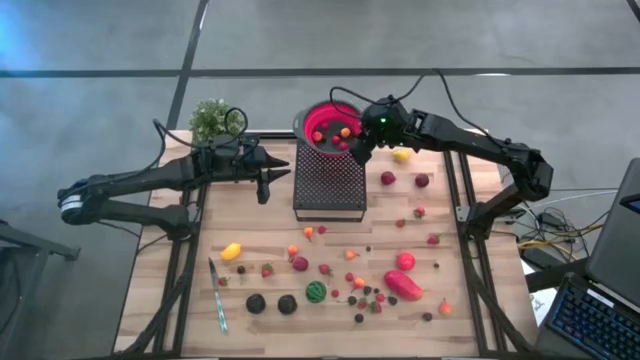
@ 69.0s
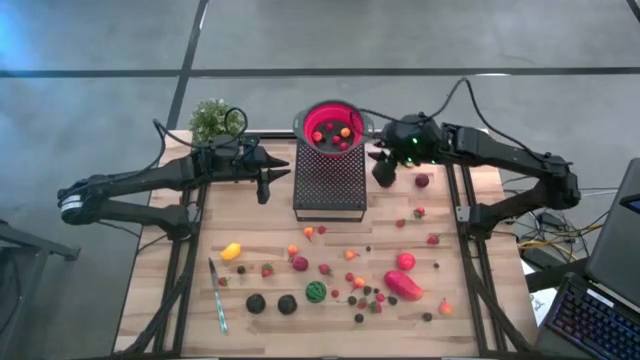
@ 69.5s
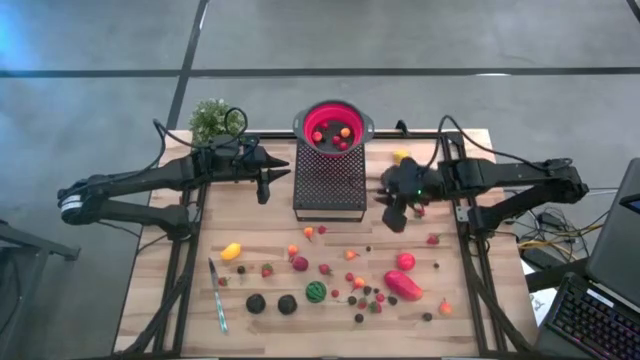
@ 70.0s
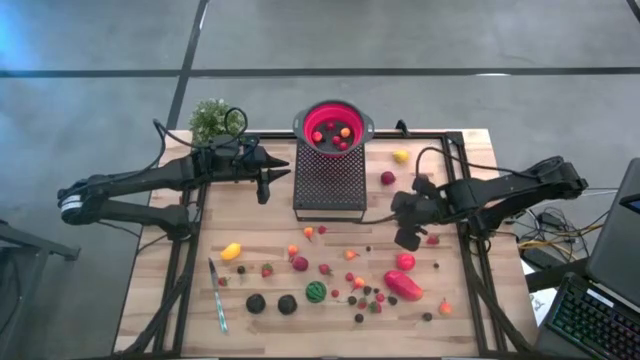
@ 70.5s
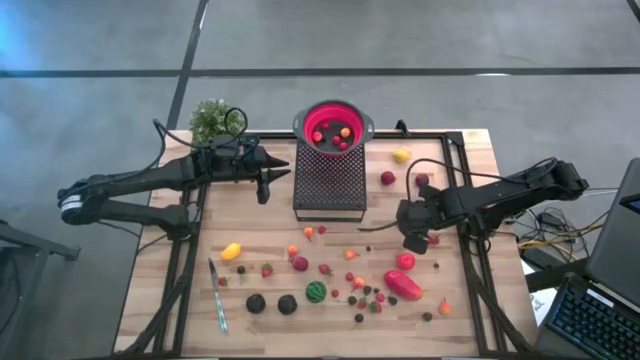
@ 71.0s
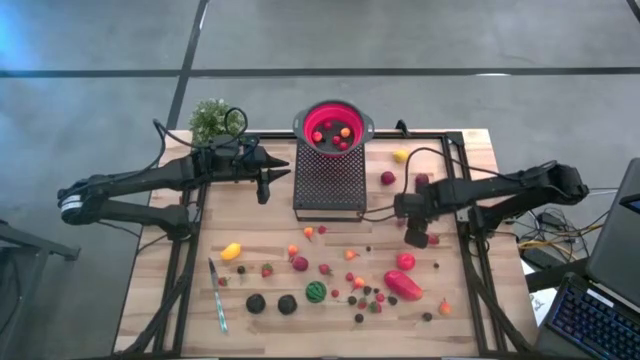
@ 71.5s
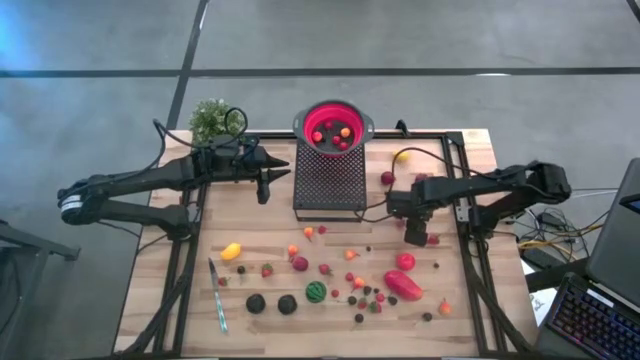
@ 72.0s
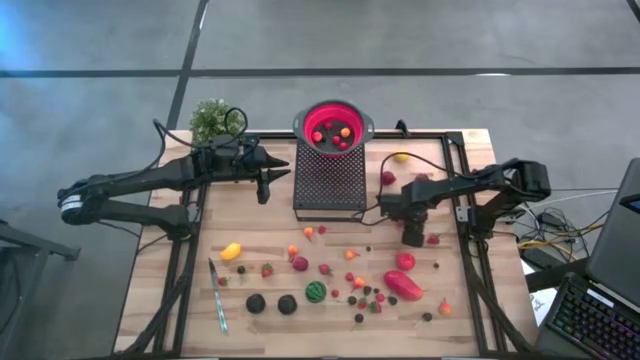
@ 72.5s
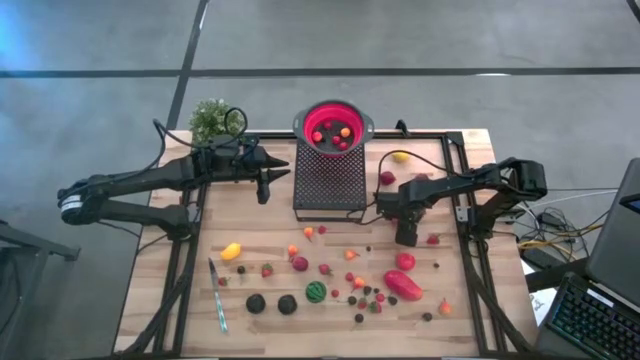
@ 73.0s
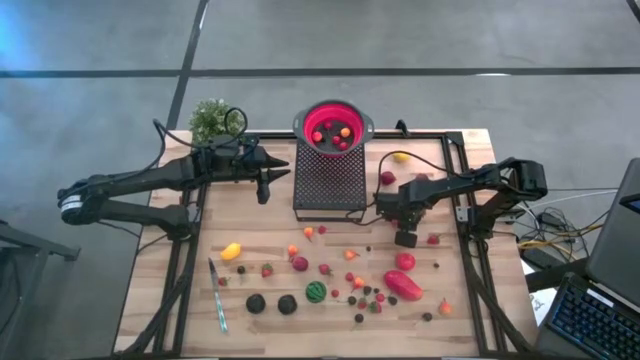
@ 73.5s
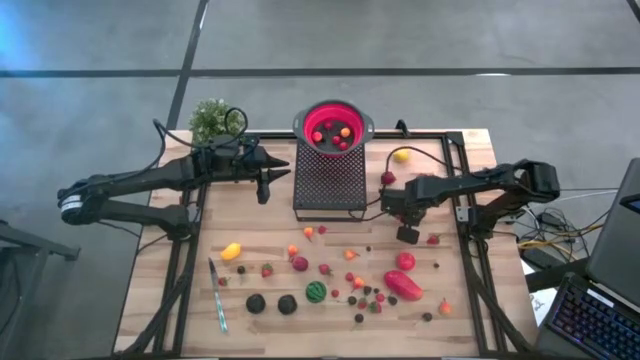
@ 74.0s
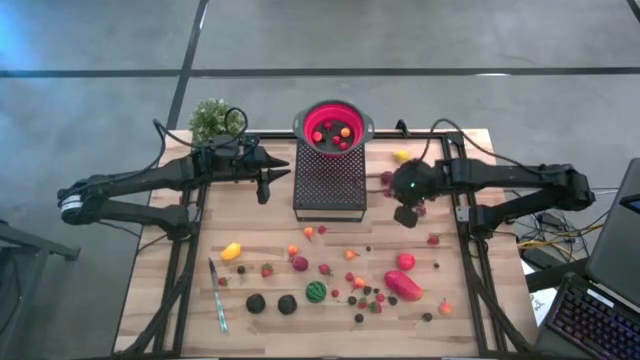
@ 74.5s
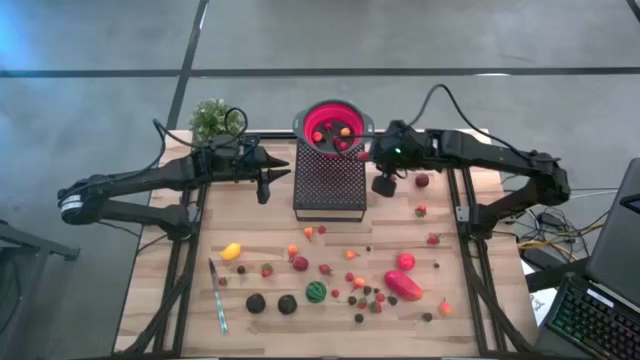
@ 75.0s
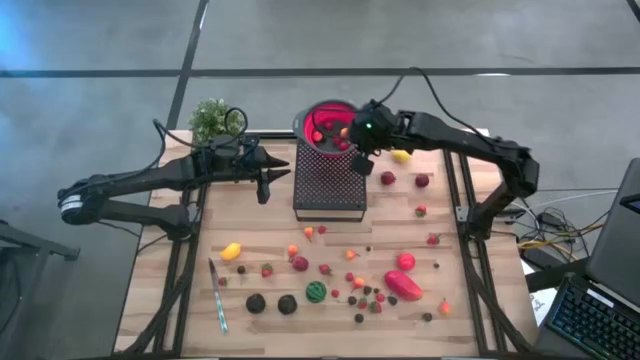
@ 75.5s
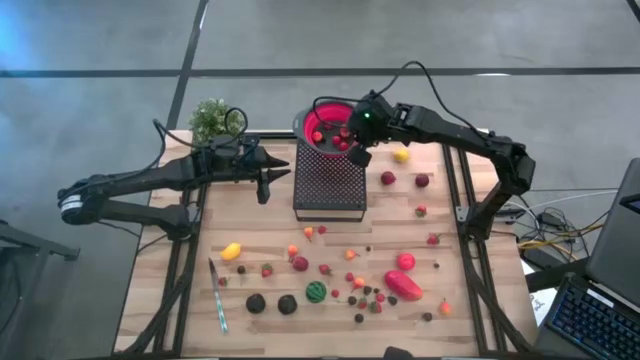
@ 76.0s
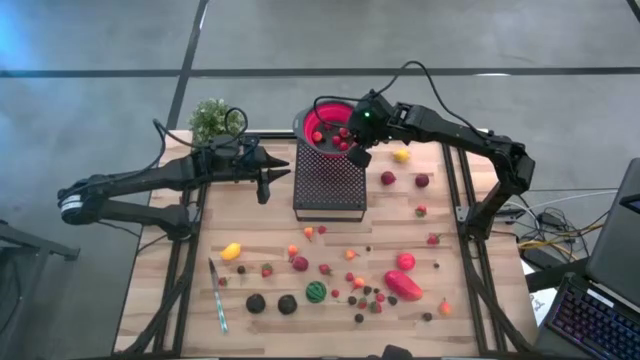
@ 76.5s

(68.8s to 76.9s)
Task: Pick & Place Fruit
Put the strawberry into the red strainer bowl on the shelf

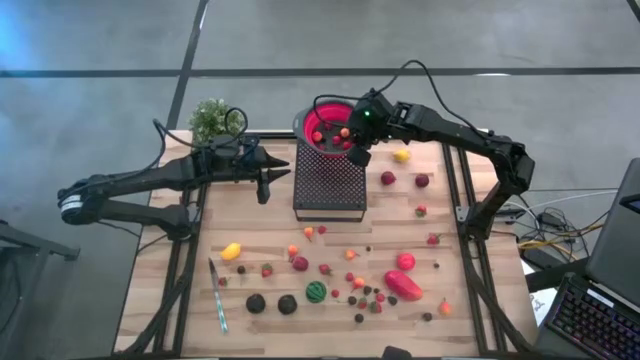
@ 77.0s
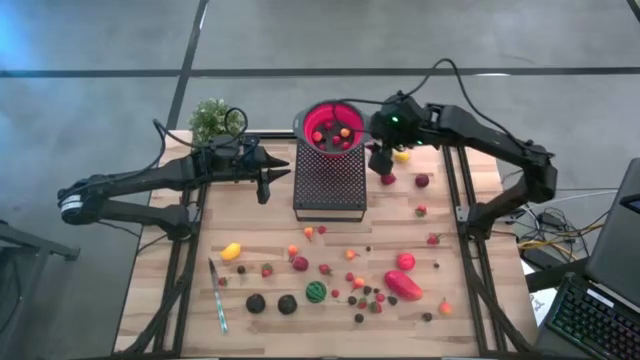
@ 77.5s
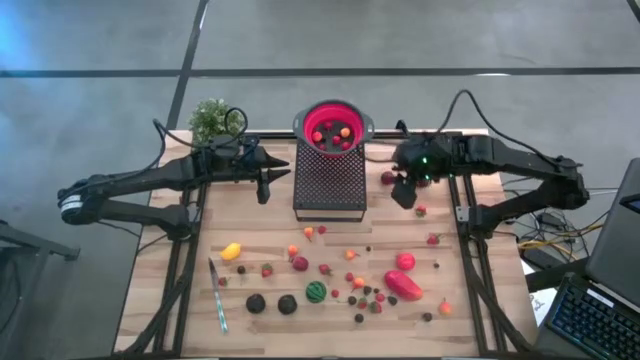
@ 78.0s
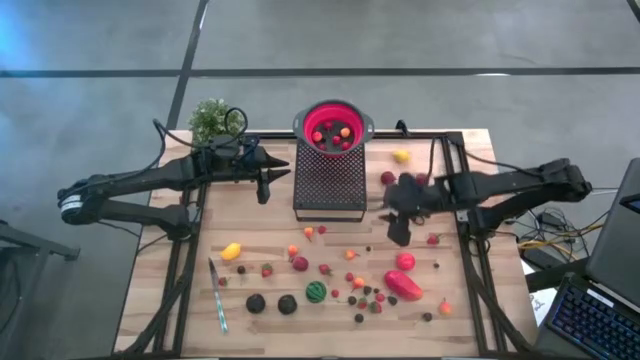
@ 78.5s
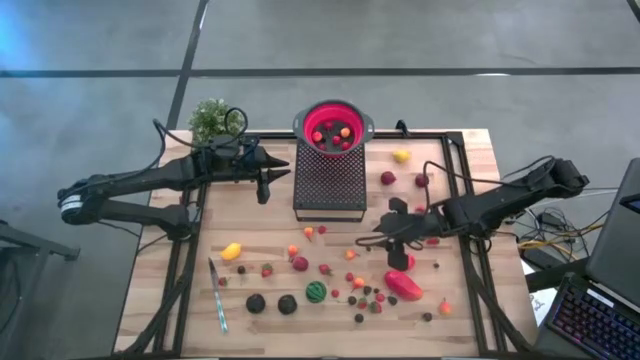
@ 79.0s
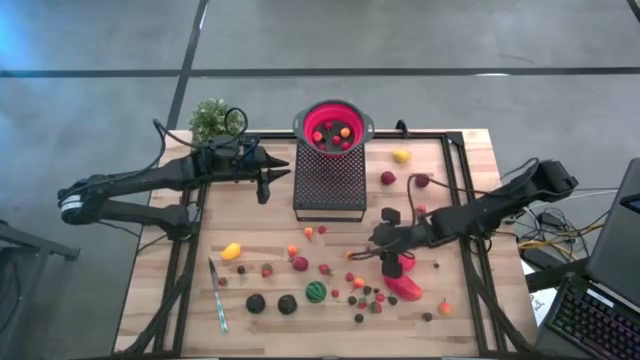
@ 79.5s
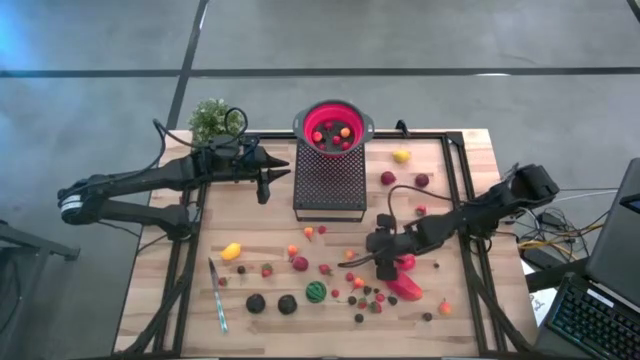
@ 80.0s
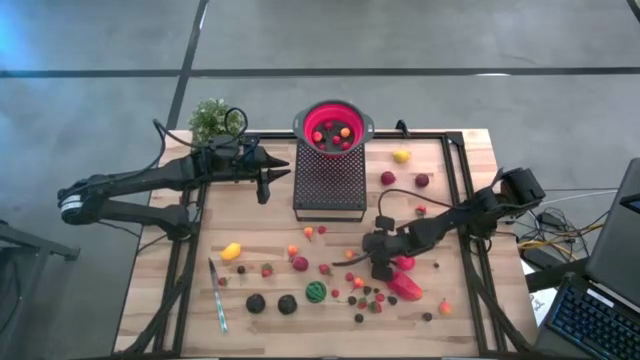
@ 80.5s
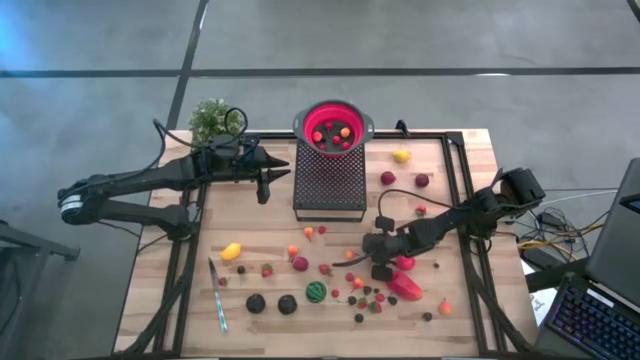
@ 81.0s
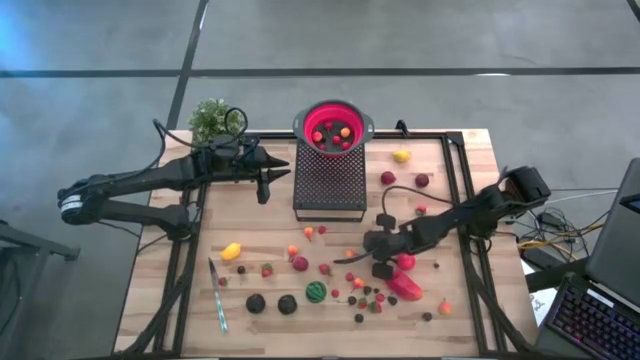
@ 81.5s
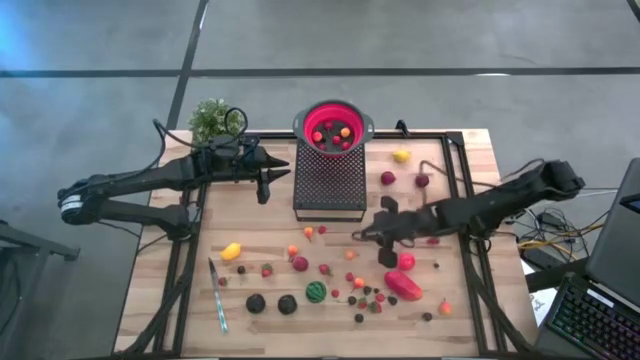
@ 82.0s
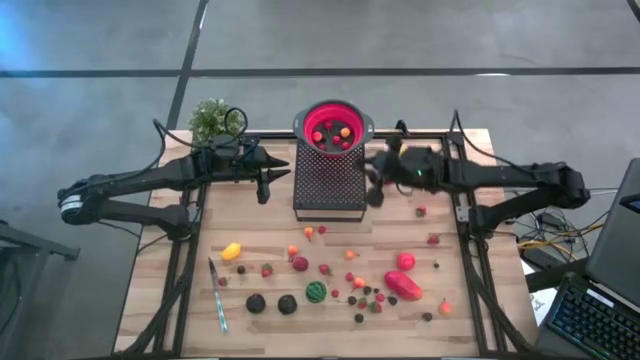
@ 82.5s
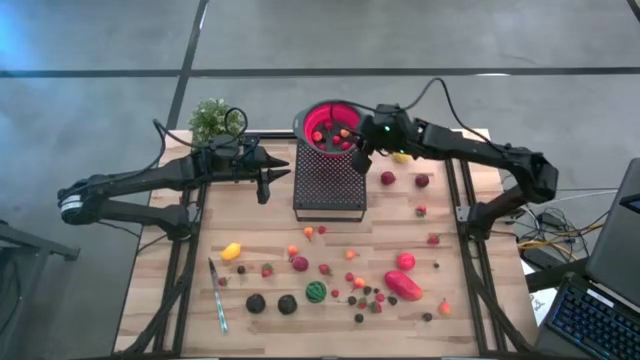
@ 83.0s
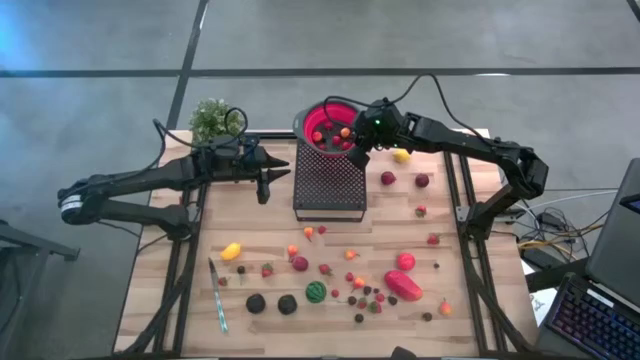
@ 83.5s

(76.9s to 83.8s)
Put the blueberry into the red strainer bowl on the shelf

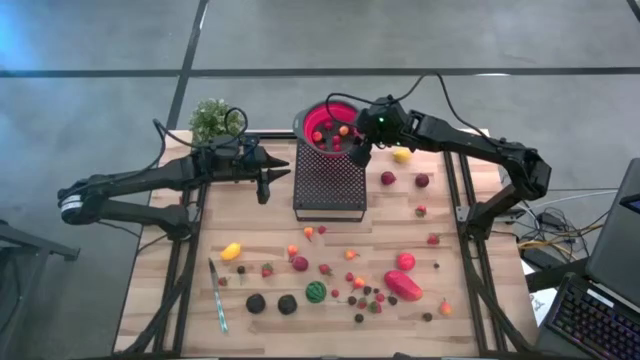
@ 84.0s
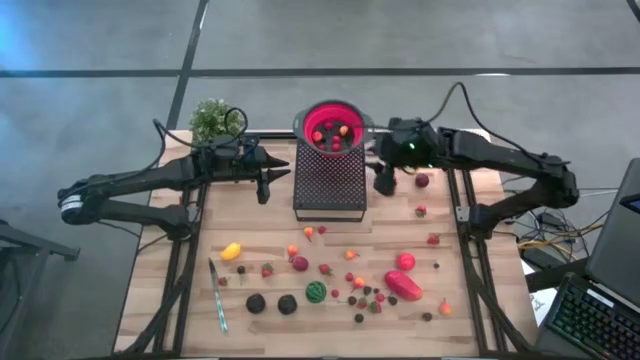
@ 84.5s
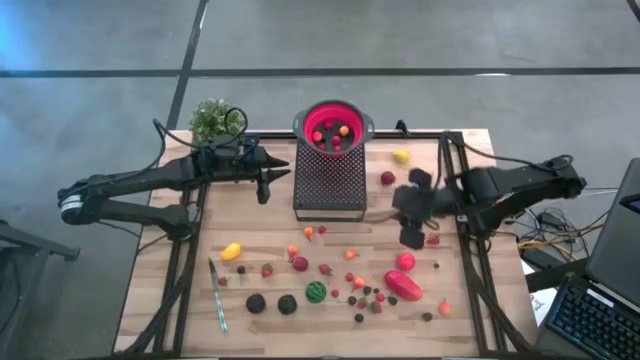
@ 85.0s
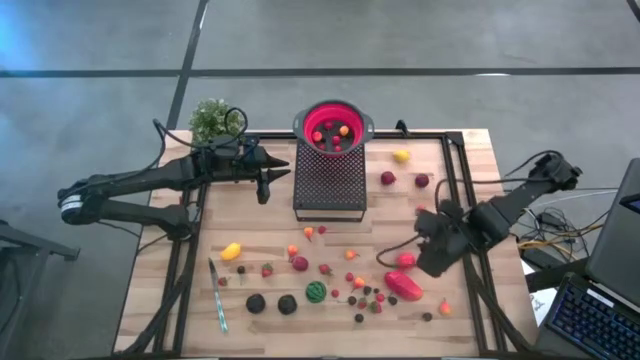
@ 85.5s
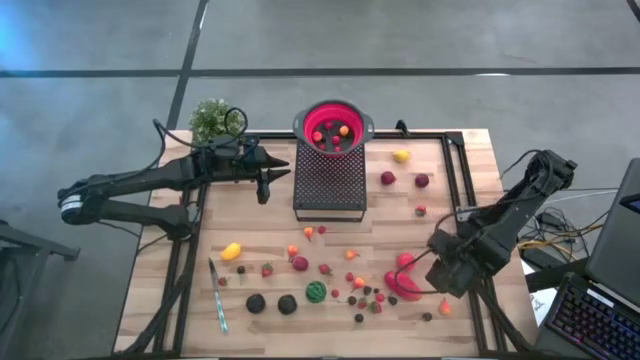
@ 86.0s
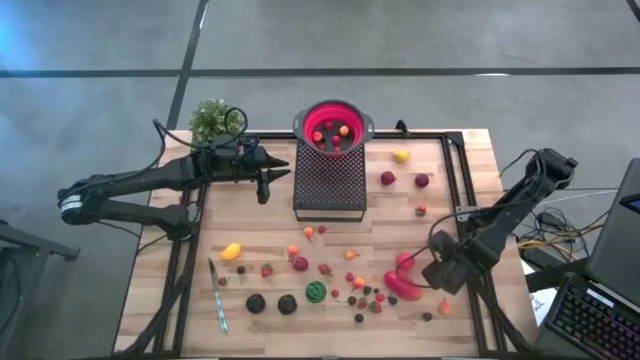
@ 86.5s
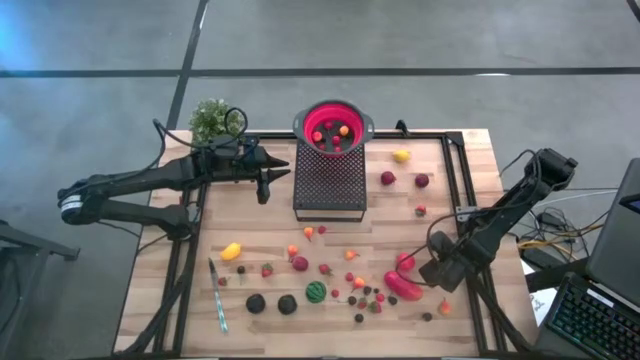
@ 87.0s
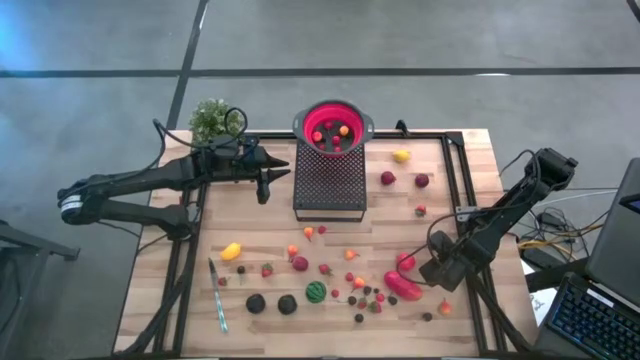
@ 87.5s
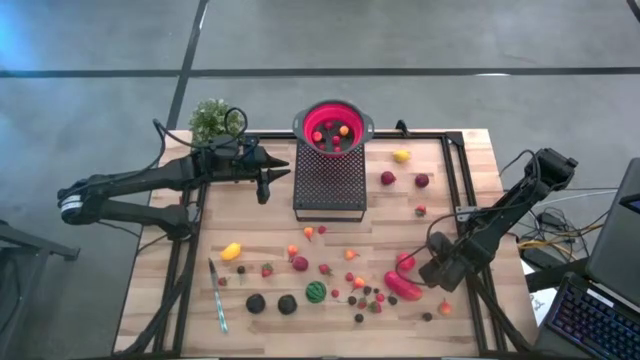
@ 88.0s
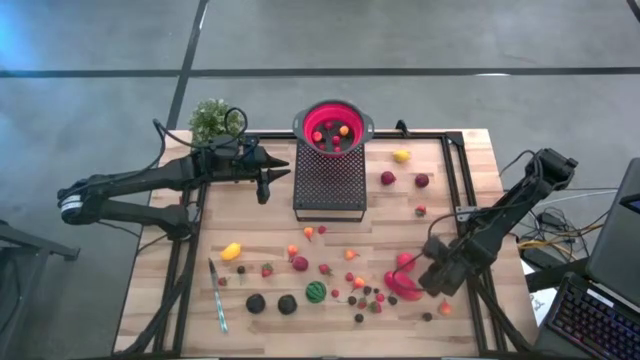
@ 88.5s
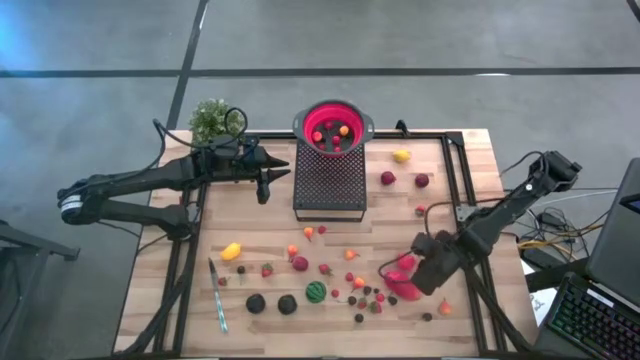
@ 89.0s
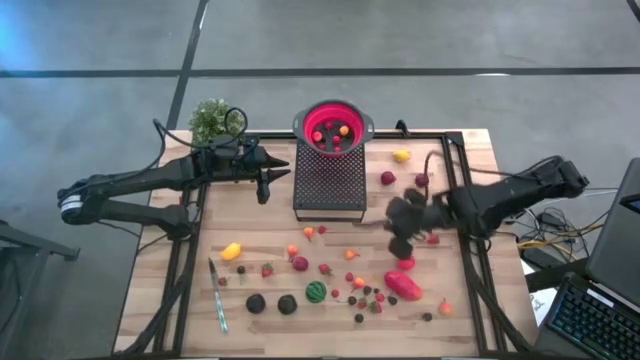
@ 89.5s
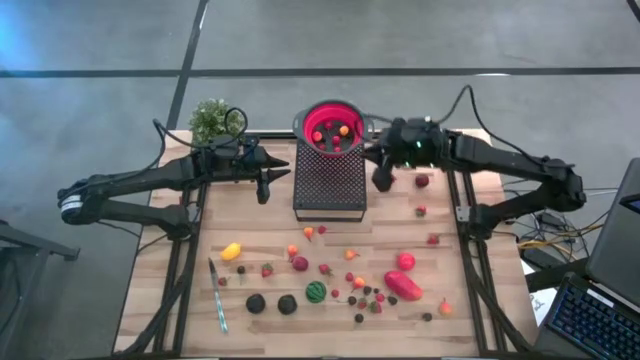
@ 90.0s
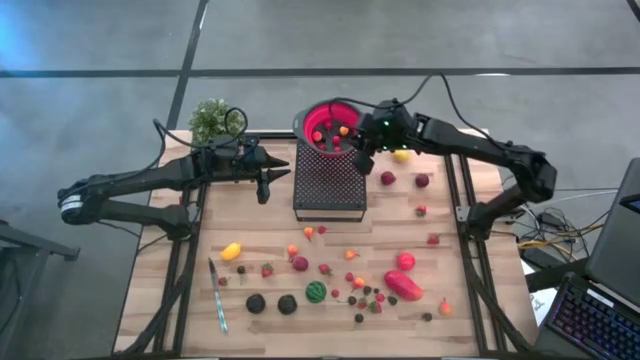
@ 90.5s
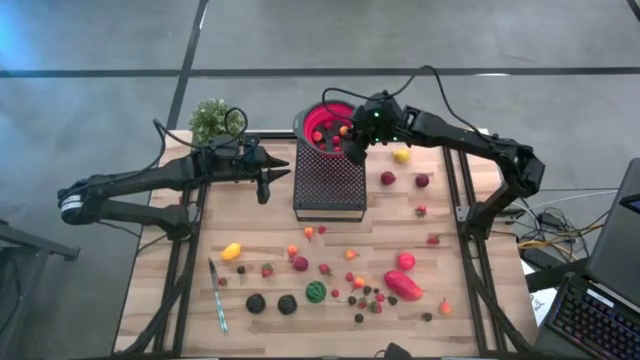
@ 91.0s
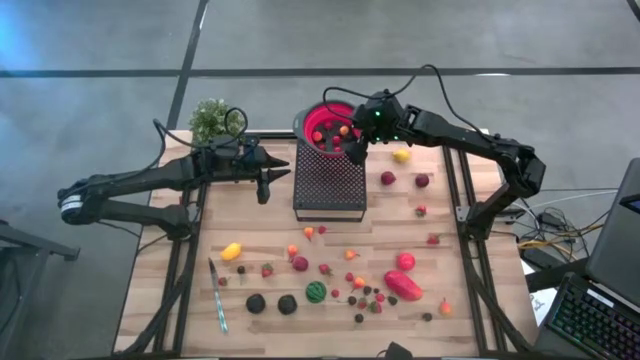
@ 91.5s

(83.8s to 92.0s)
Put the blueberry into the red strainer bowl on the shelf
